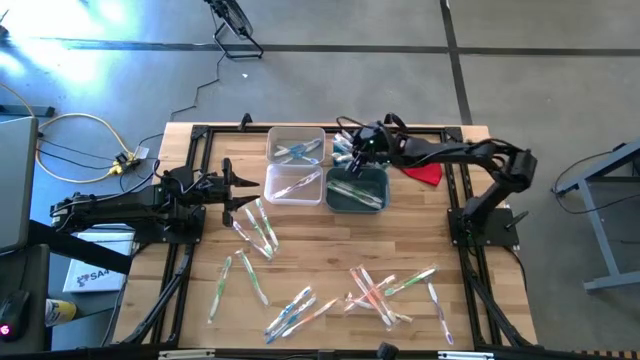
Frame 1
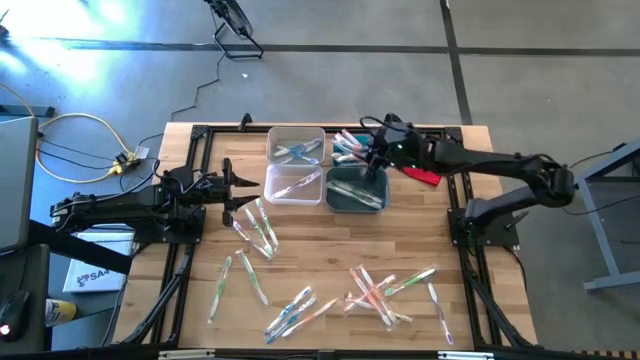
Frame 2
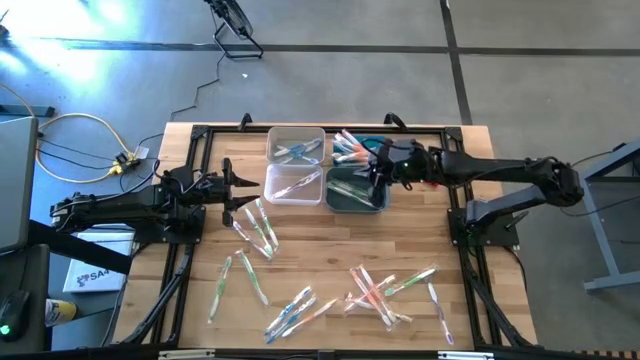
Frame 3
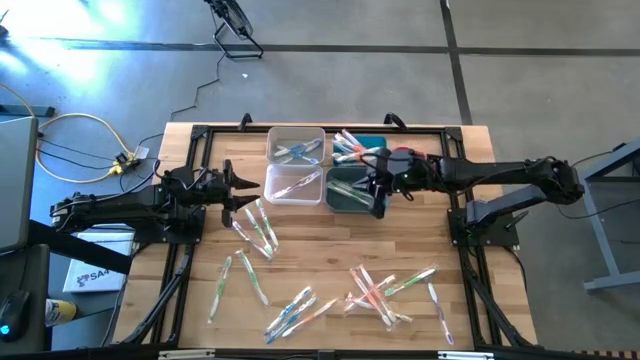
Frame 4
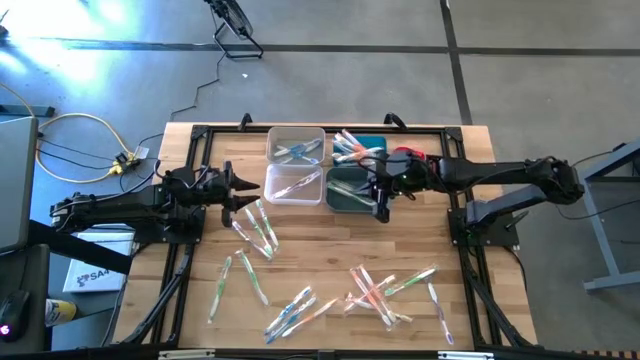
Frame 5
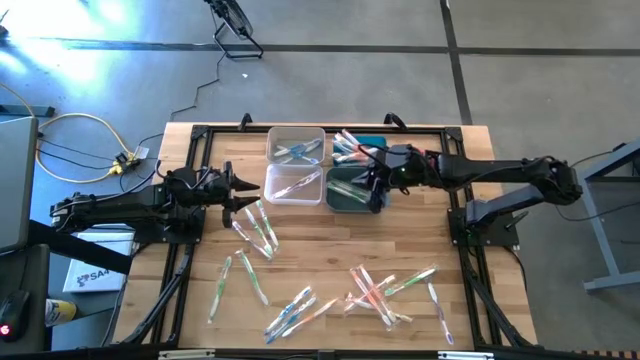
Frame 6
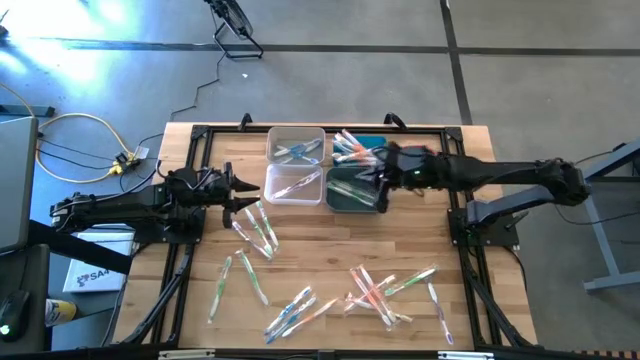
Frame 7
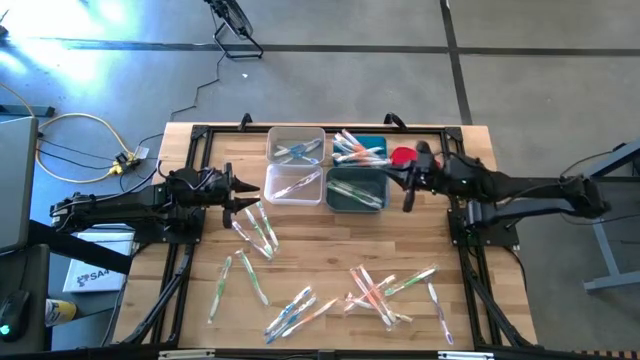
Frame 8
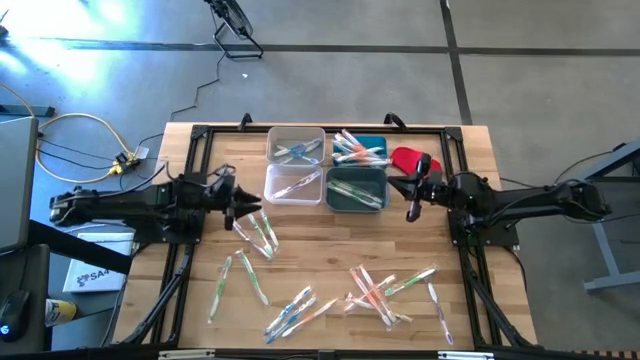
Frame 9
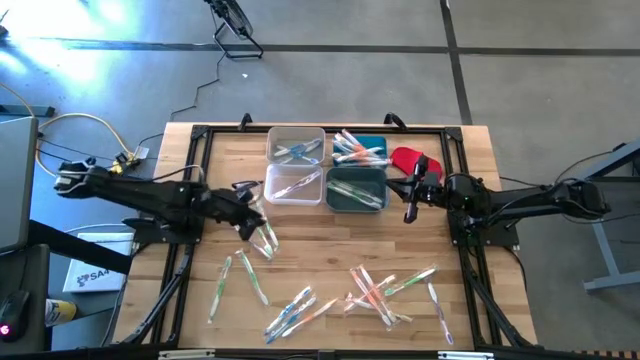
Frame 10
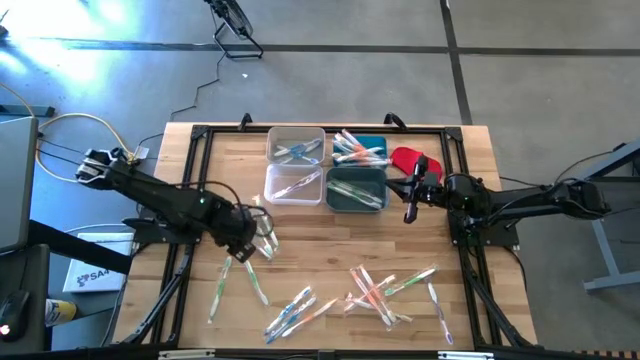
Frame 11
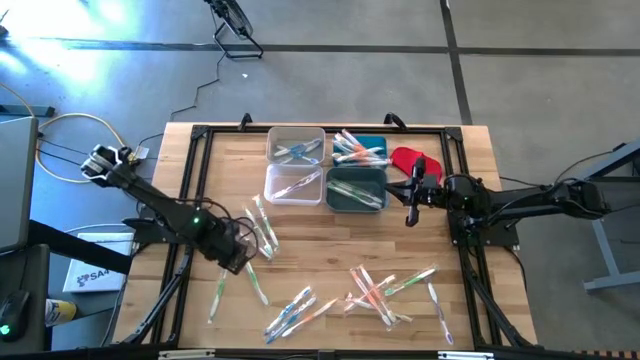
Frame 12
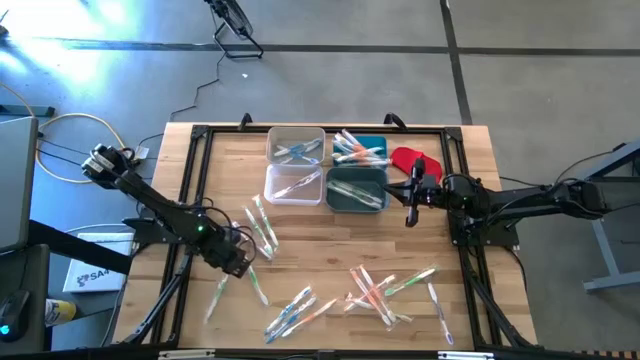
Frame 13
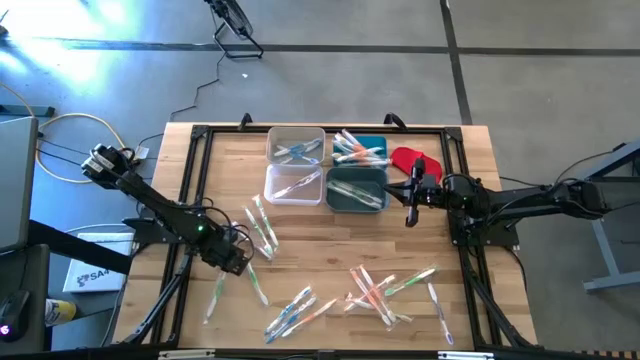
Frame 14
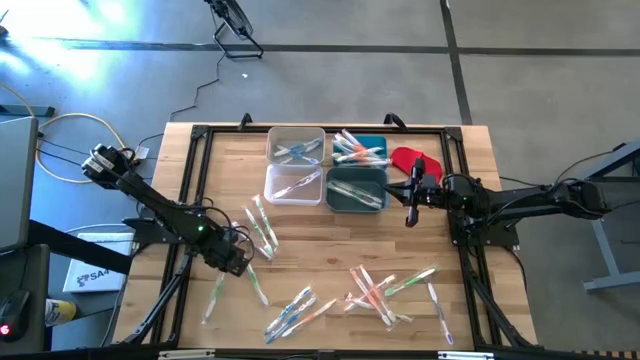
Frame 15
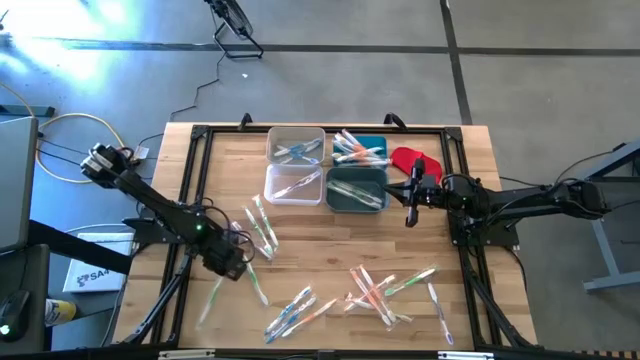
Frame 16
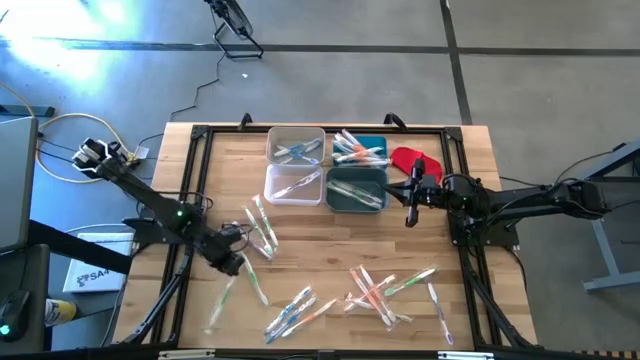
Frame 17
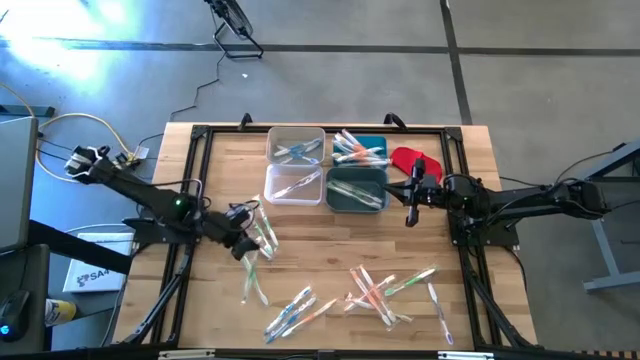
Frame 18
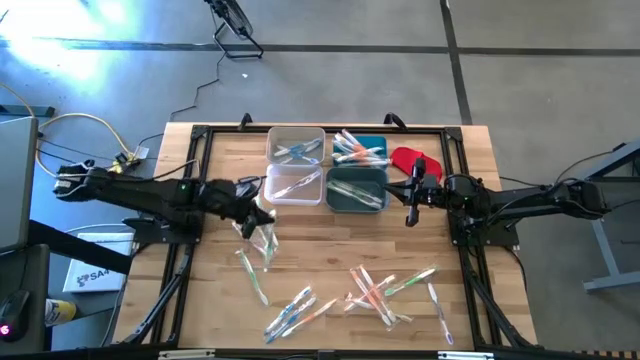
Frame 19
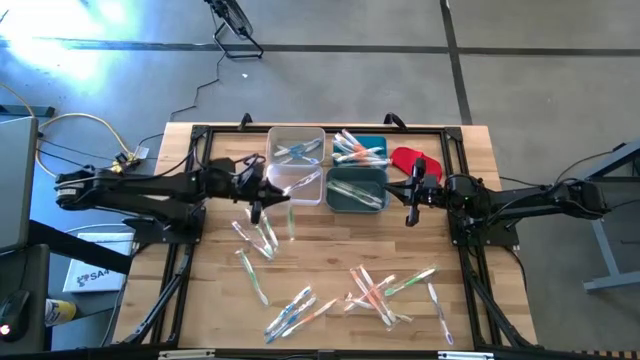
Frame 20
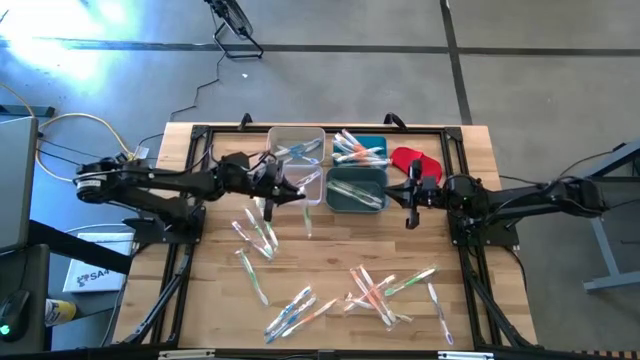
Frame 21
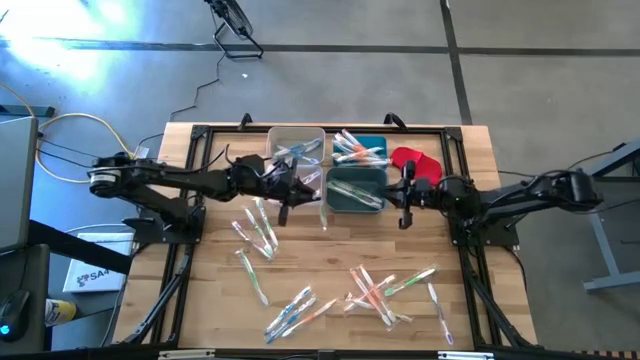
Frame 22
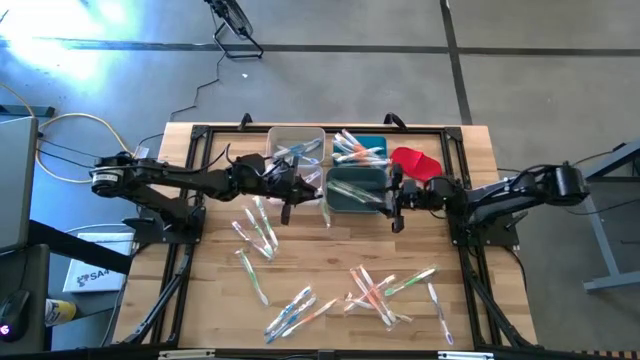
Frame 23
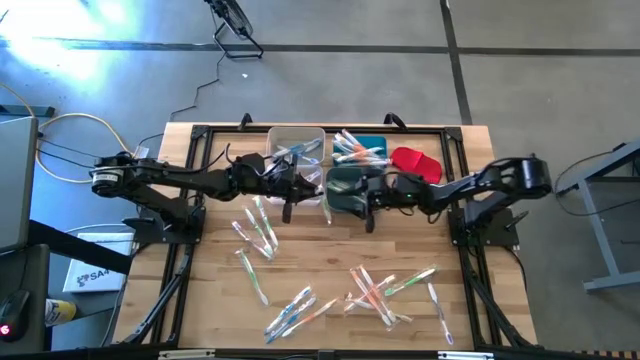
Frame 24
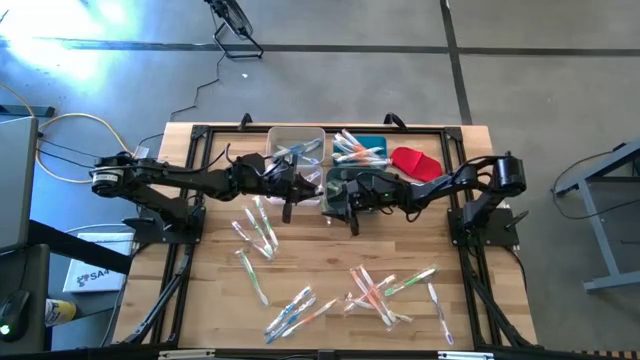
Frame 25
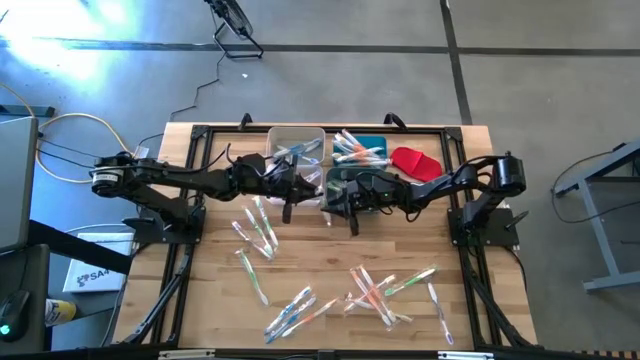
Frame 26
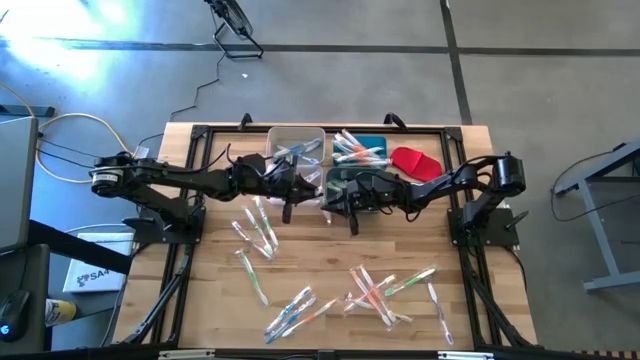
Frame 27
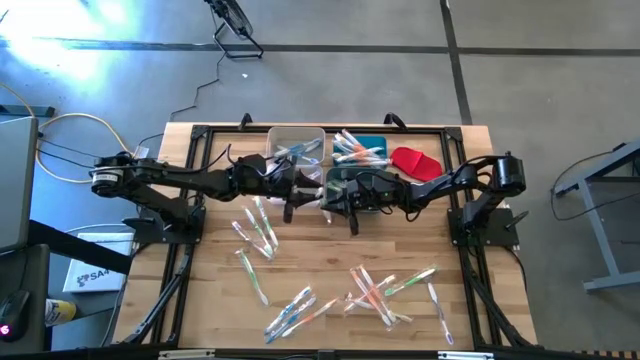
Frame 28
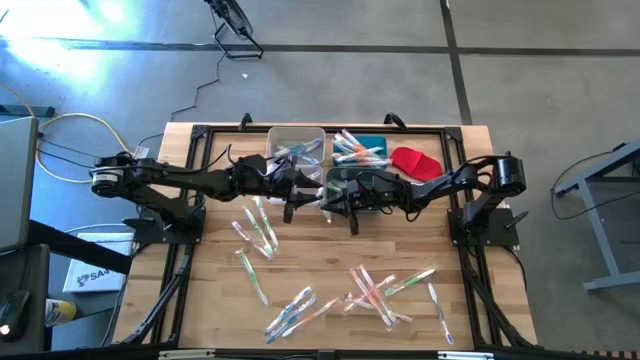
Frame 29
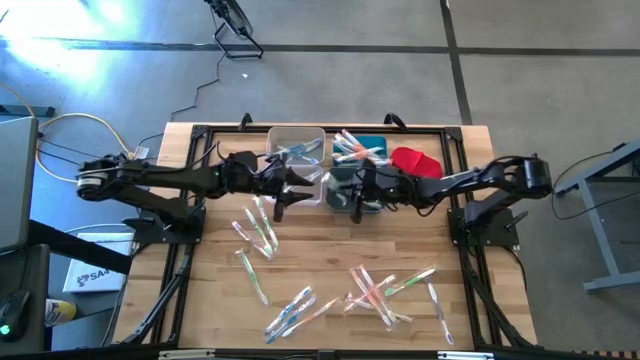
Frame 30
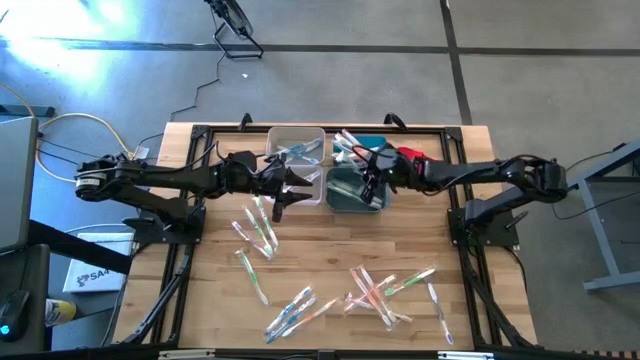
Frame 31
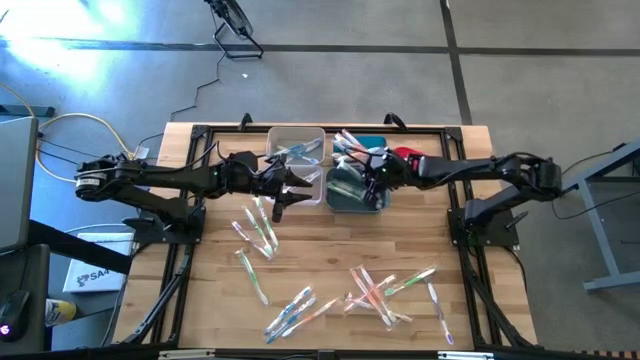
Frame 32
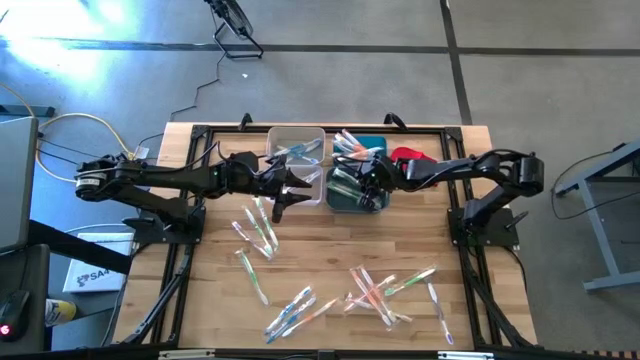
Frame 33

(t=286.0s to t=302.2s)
Task: Pick & Place Toothbrushes
Put the green toothbrush into the green bin

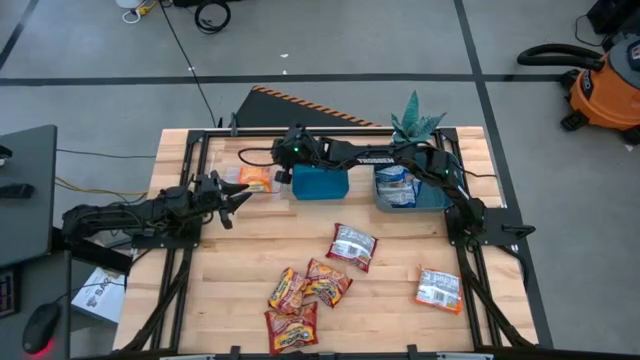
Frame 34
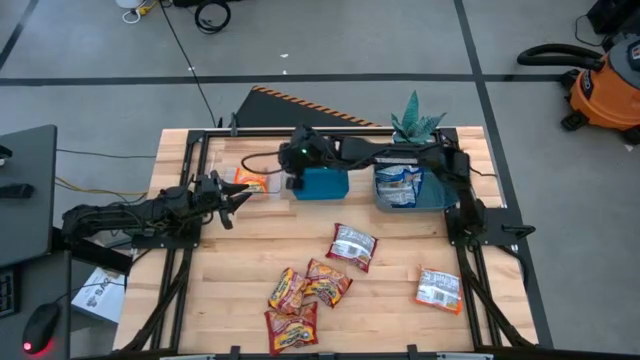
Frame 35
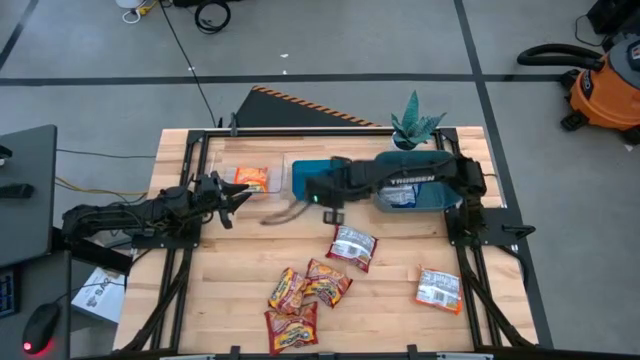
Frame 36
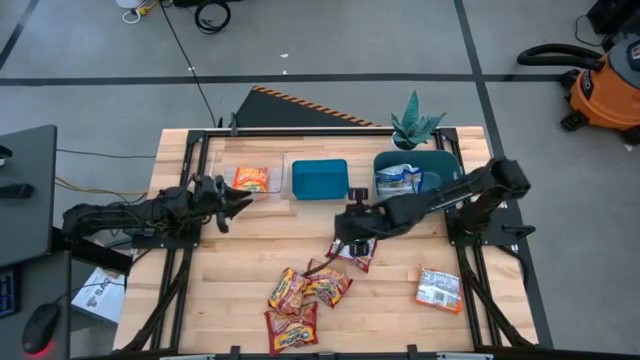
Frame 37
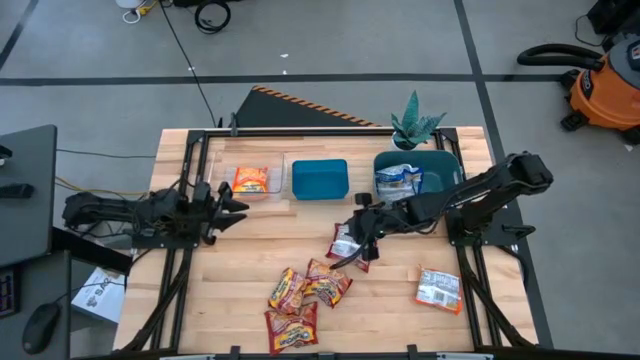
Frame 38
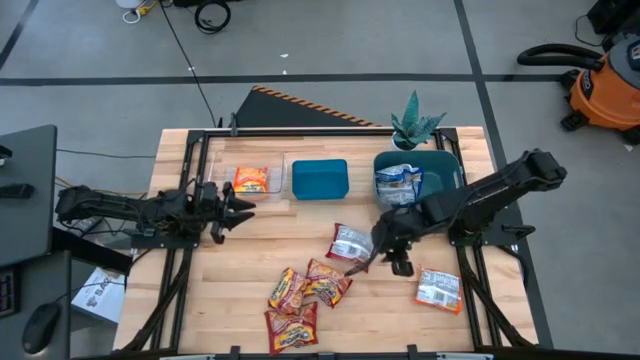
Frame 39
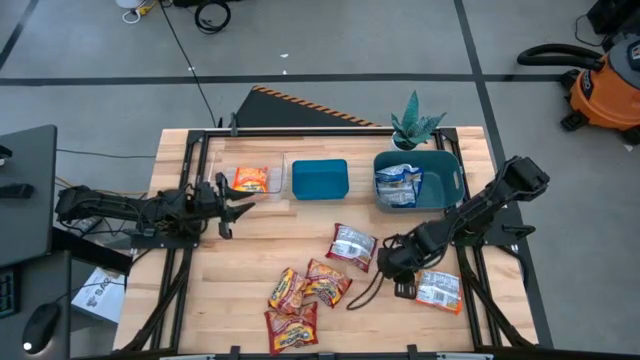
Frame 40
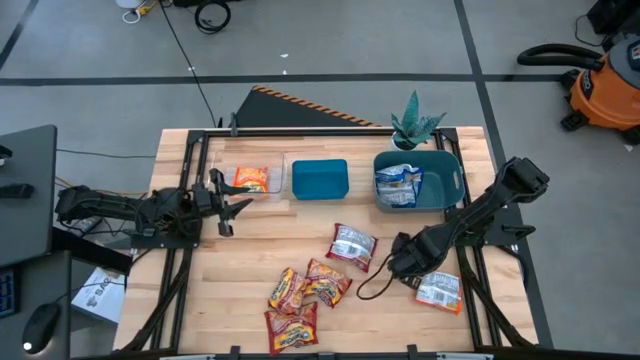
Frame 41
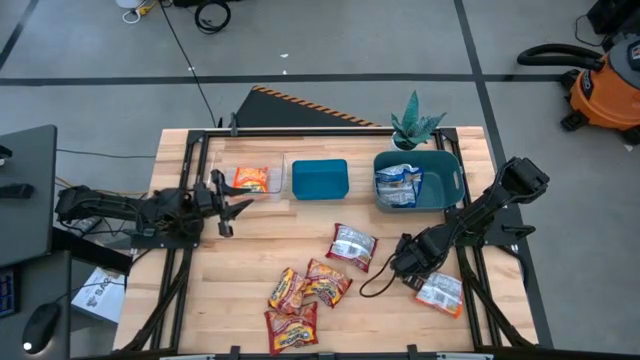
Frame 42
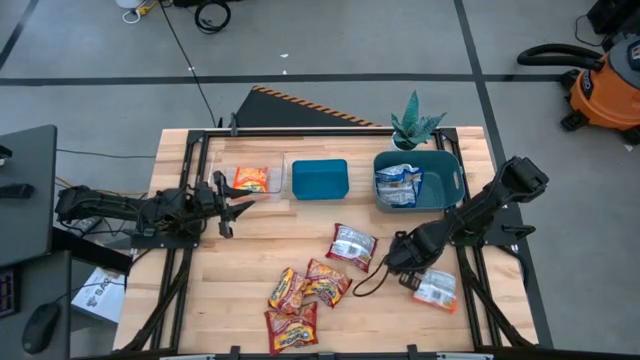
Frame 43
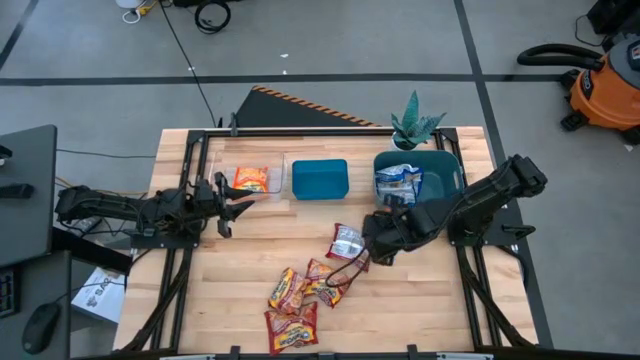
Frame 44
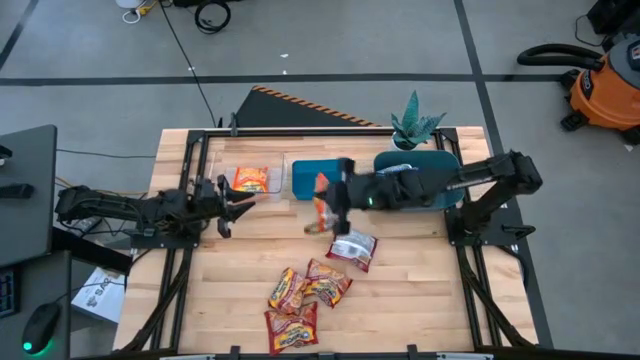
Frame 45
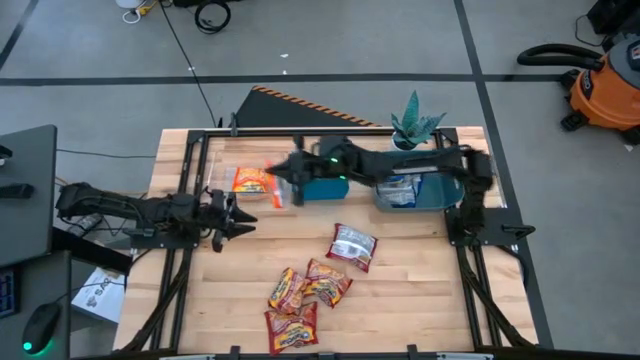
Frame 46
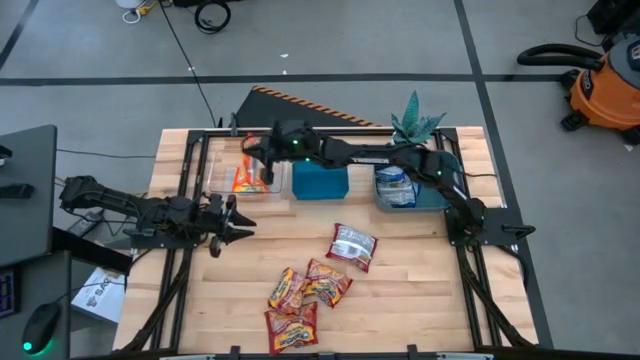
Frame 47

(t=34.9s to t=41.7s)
Task: Sort Maruchan noodles
Put the orange noodle pack into the transparent bin
